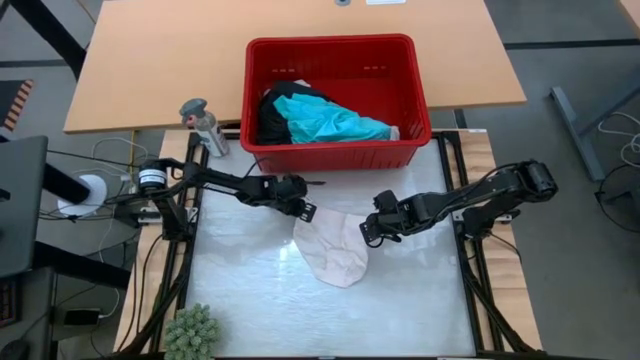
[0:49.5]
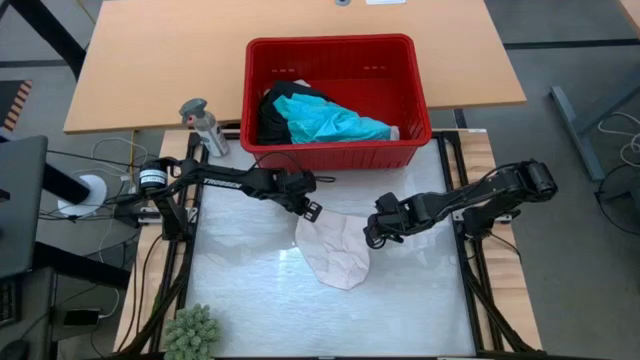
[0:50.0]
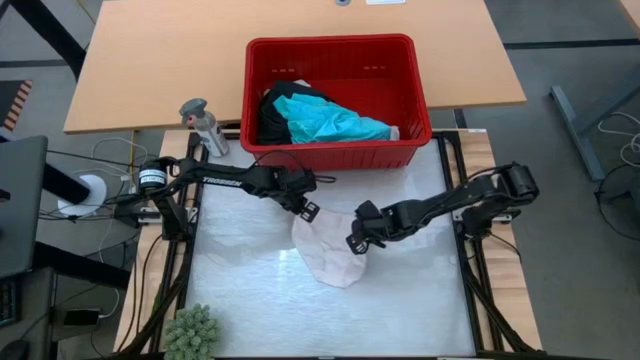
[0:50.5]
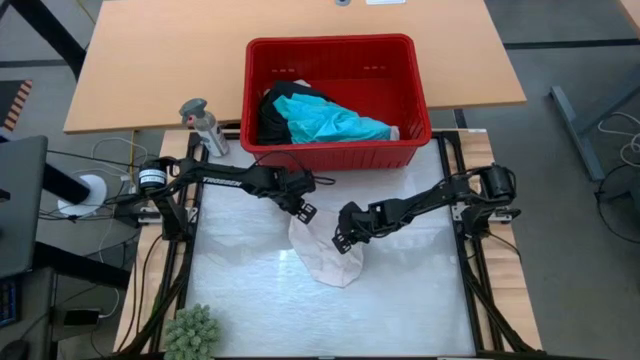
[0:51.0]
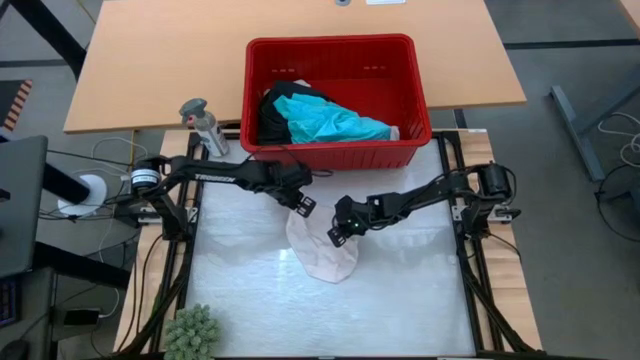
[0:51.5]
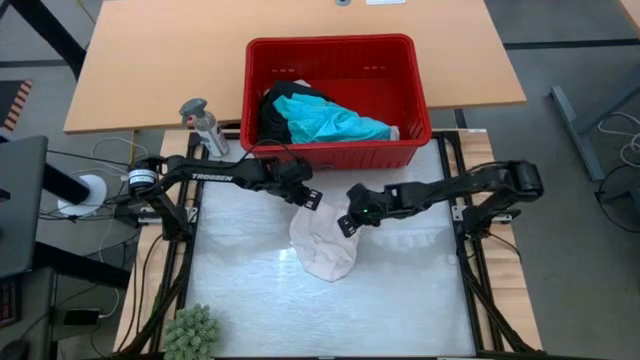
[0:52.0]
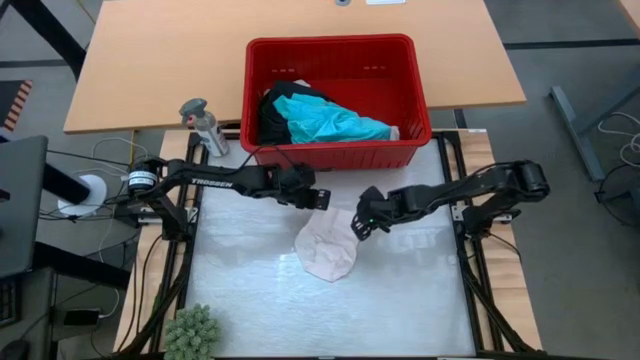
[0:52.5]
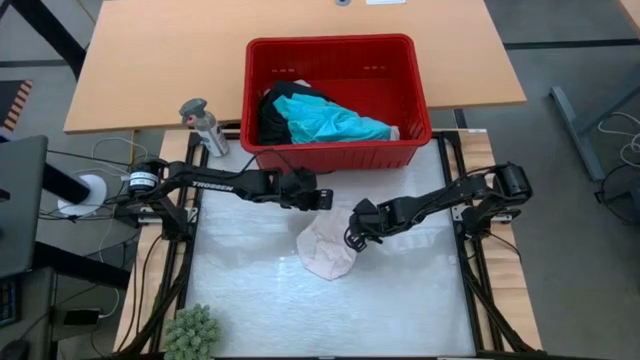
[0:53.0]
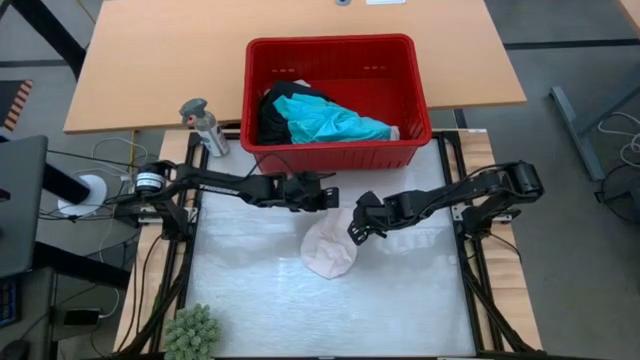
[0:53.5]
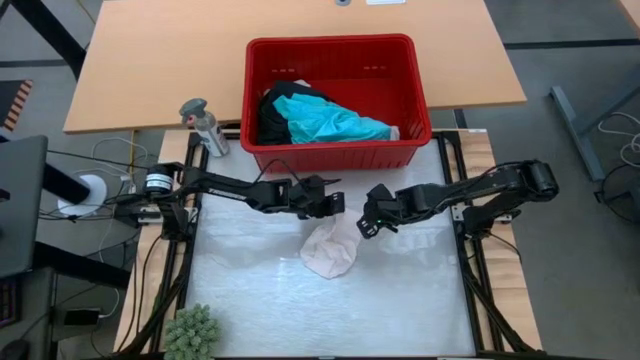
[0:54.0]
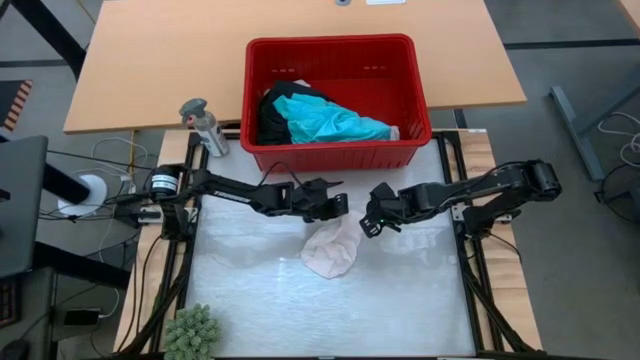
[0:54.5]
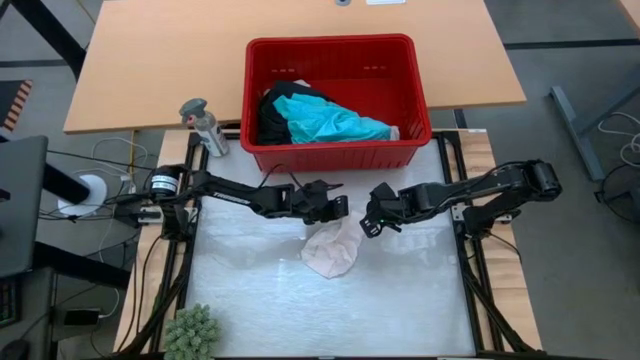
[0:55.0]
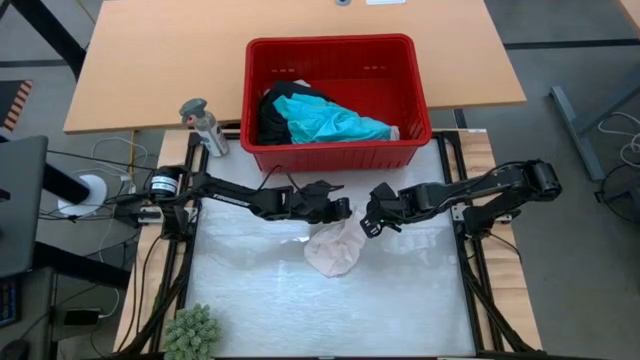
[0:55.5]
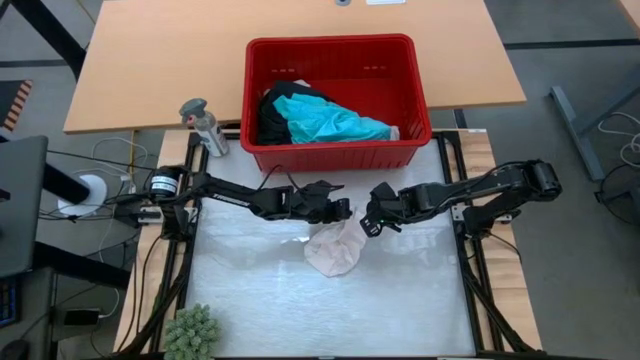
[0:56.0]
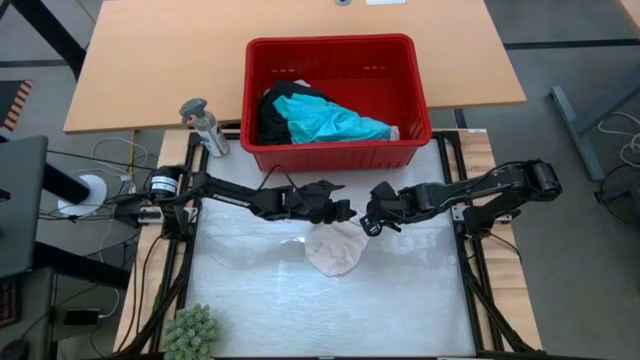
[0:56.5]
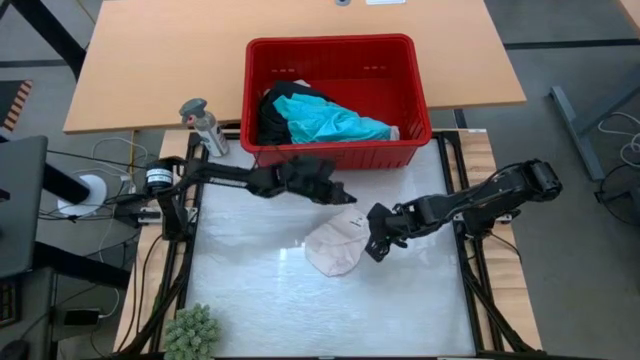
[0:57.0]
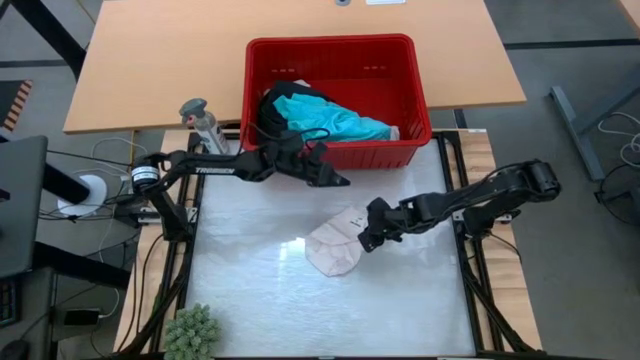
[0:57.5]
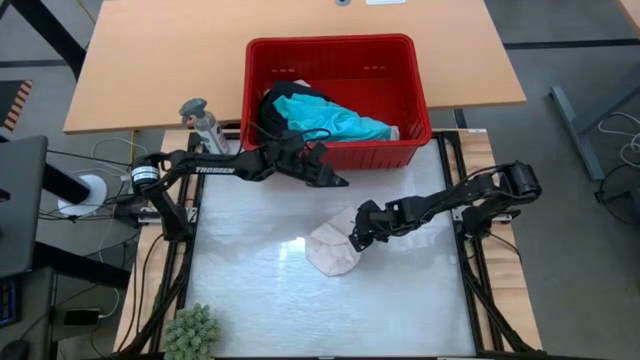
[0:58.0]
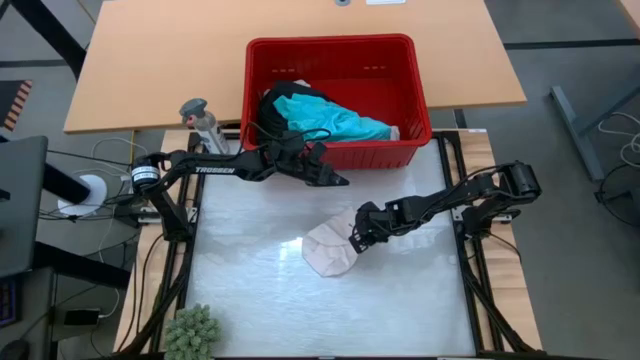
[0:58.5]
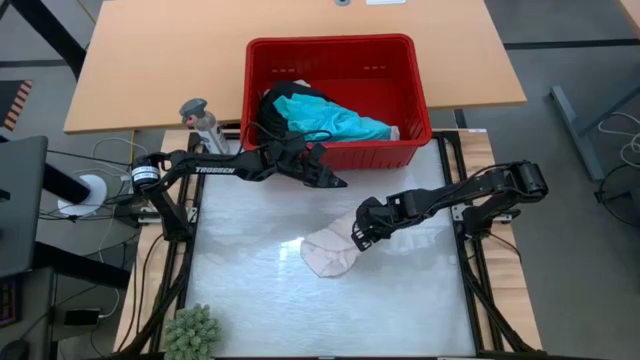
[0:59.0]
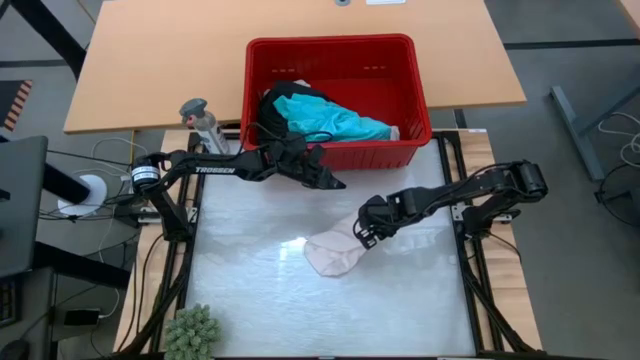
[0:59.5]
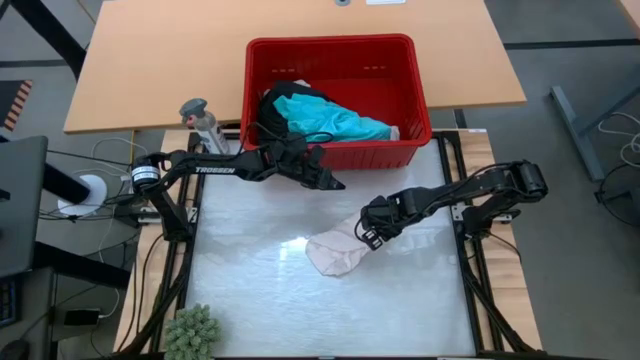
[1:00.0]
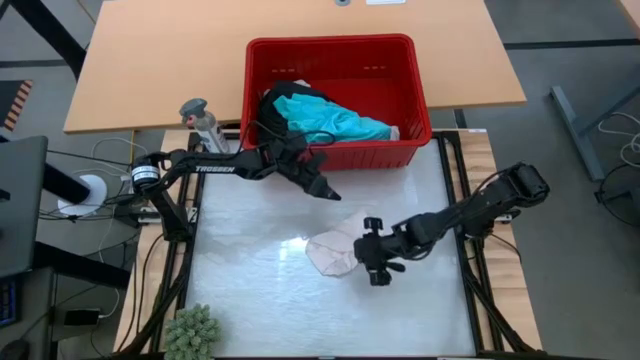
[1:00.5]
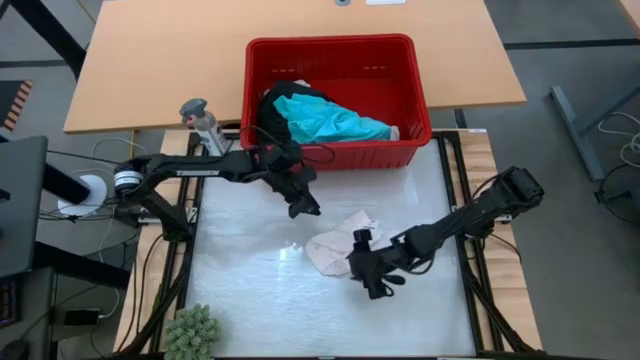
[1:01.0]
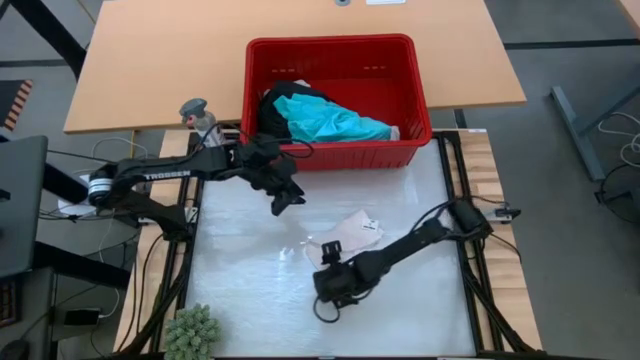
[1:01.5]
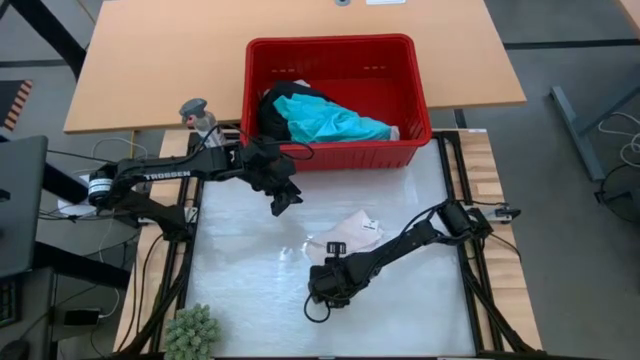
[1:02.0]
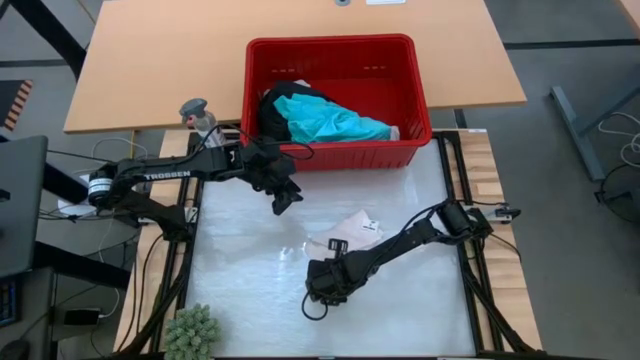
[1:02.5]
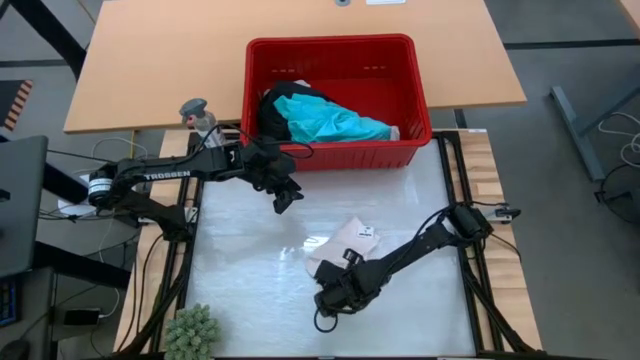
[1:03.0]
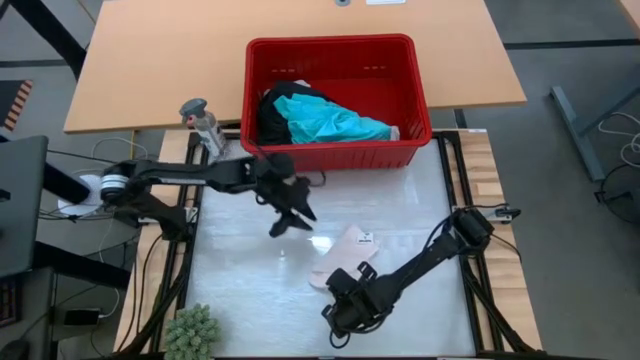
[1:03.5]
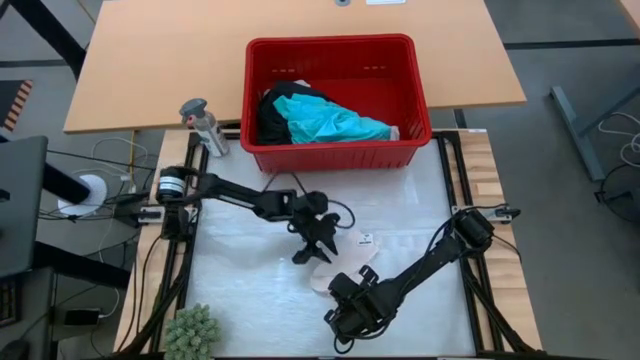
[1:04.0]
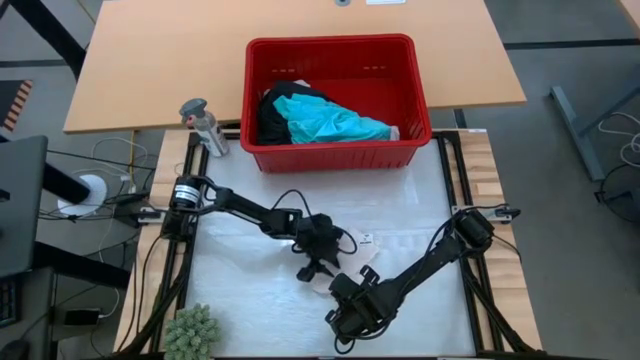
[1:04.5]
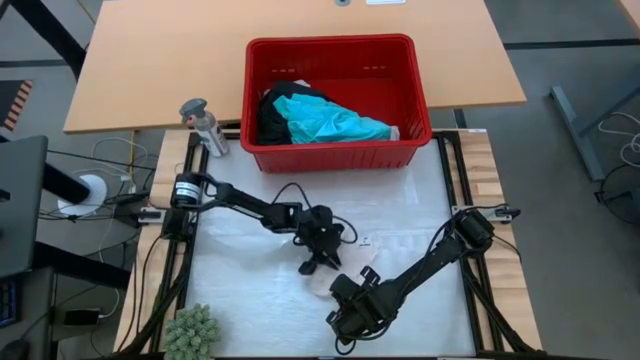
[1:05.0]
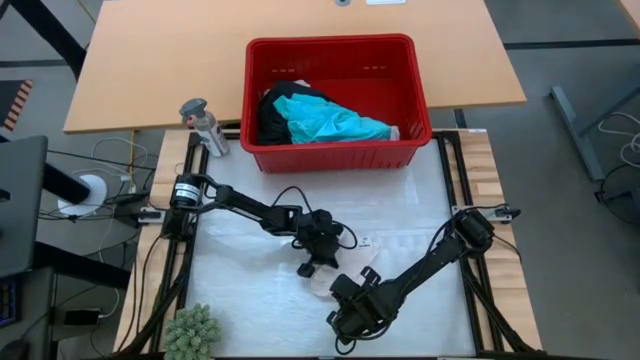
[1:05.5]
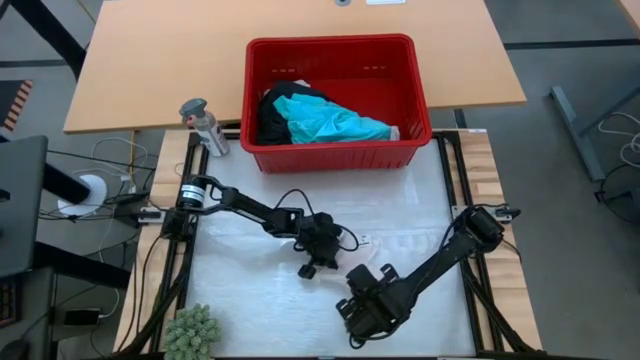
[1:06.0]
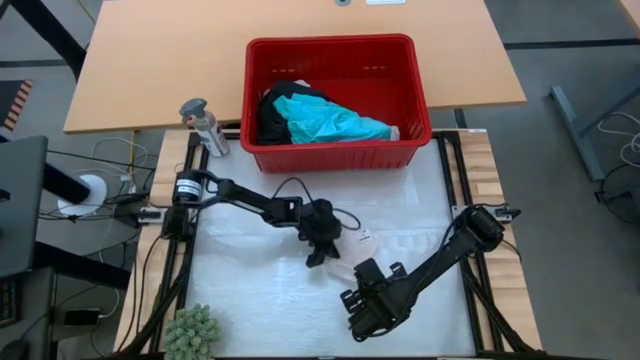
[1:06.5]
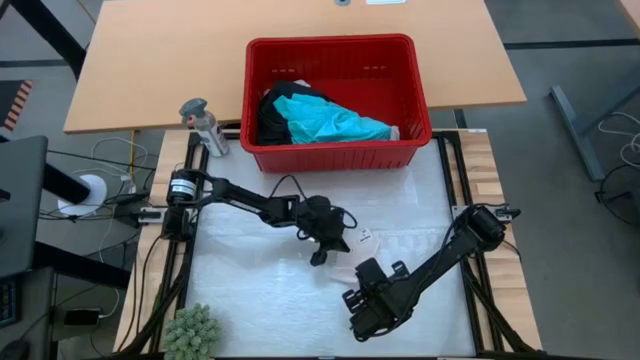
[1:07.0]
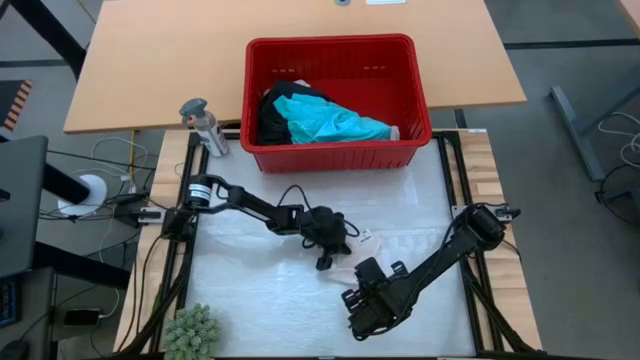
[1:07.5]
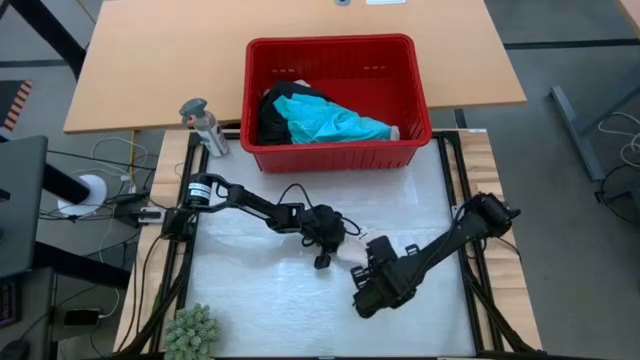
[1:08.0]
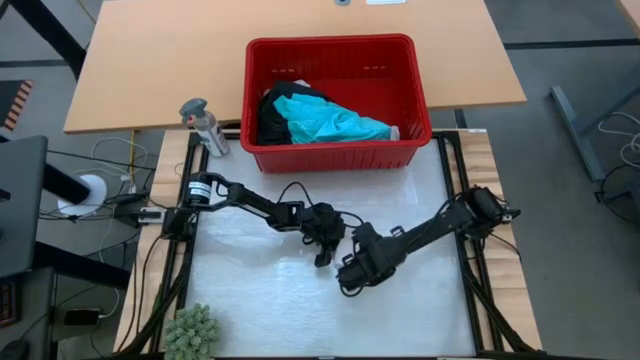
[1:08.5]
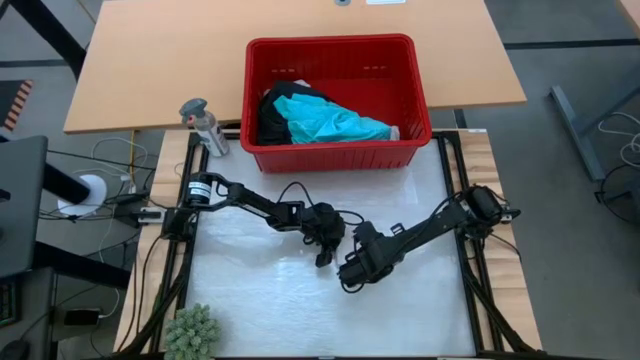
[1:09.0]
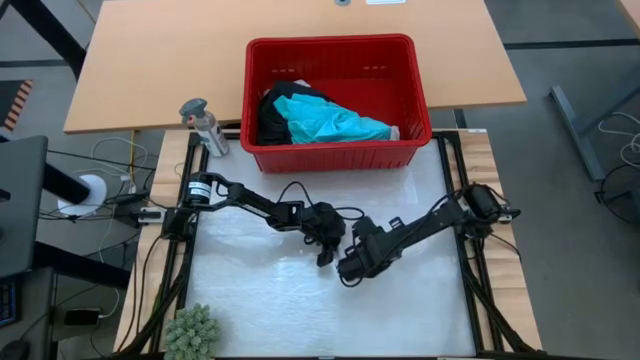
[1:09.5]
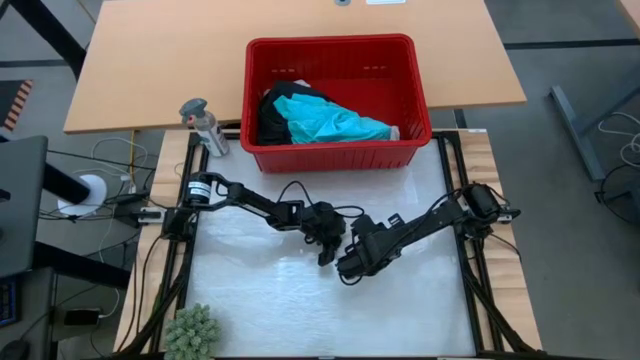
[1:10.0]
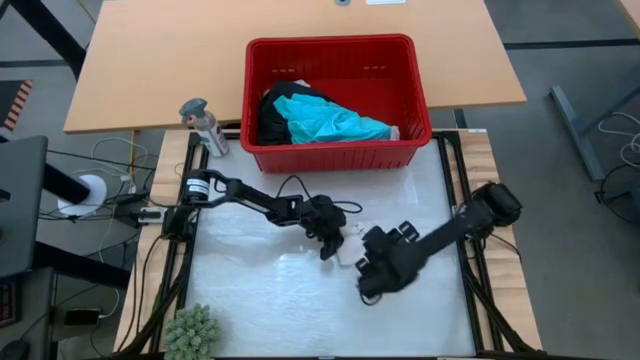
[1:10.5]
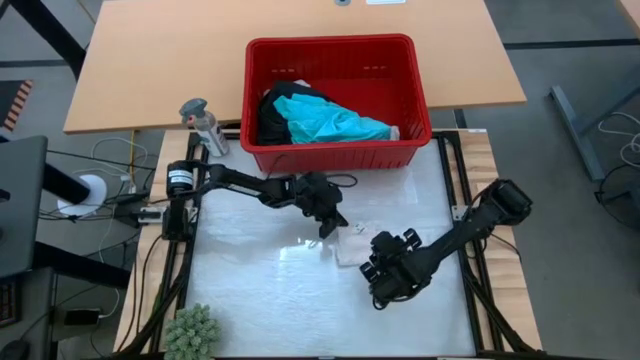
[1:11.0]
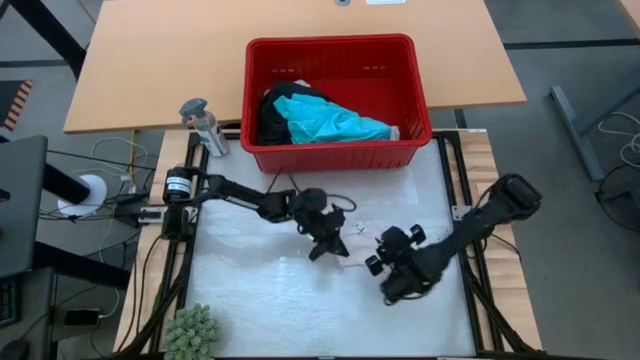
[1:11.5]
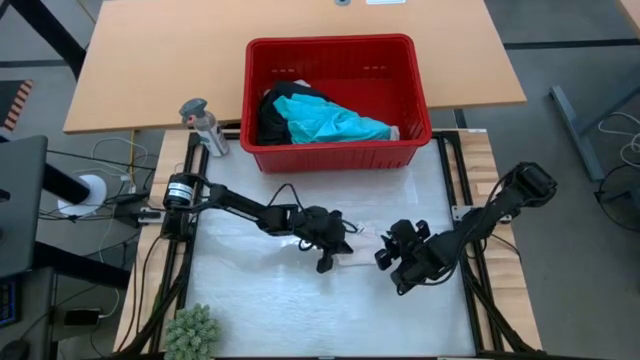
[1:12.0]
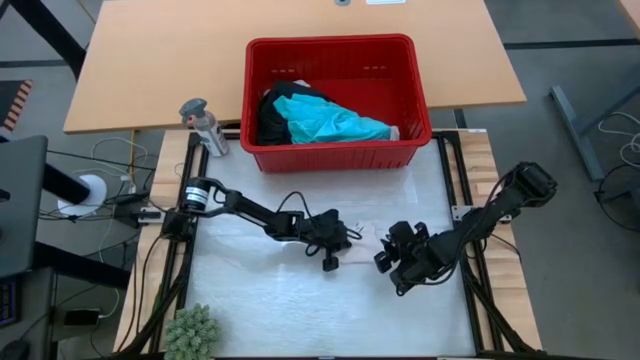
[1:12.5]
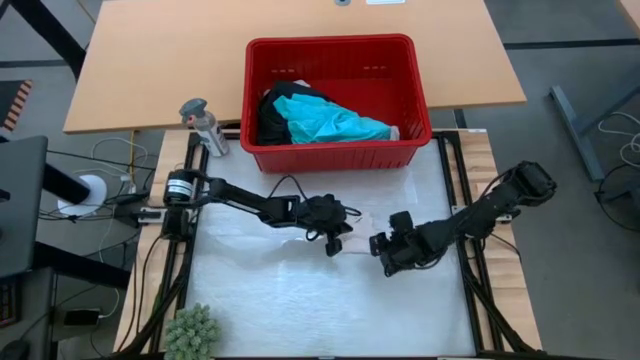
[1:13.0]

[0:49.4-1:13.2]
Task: Fold Laundry from Bin
Fold the white underwear
